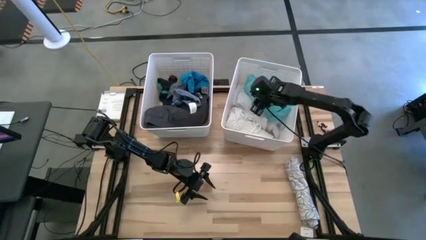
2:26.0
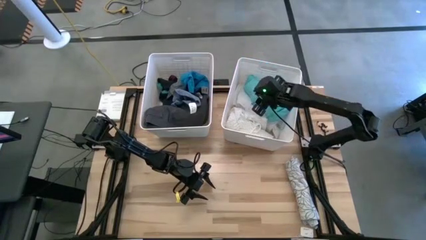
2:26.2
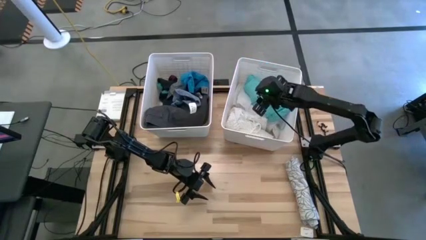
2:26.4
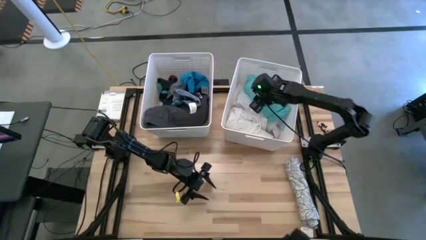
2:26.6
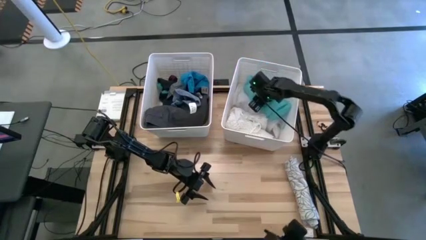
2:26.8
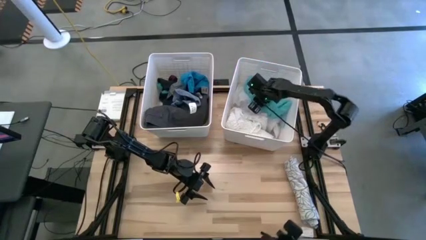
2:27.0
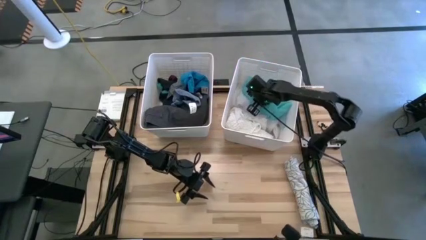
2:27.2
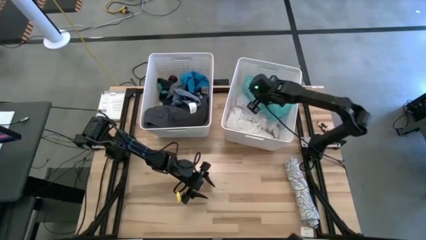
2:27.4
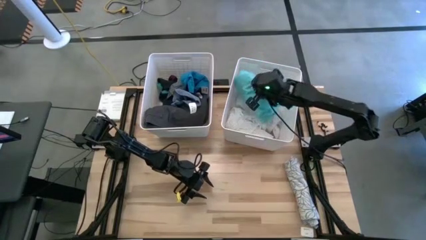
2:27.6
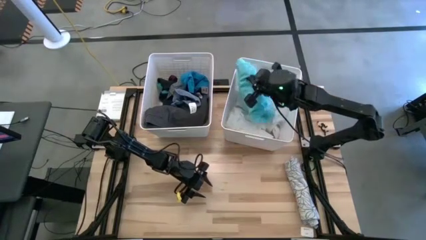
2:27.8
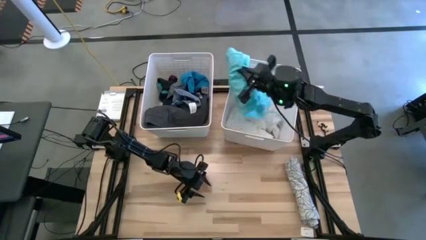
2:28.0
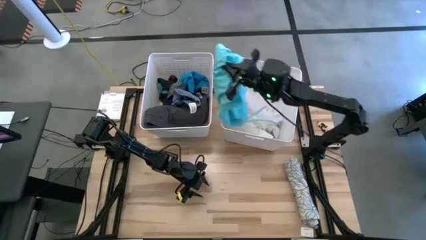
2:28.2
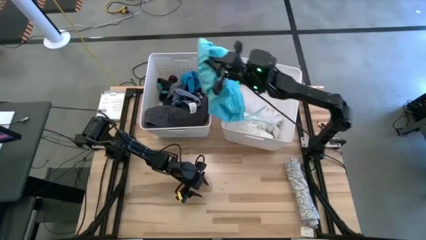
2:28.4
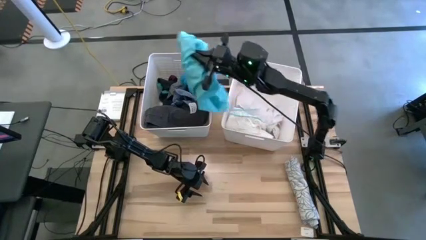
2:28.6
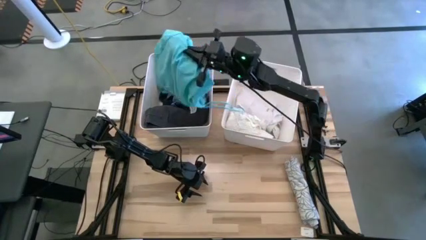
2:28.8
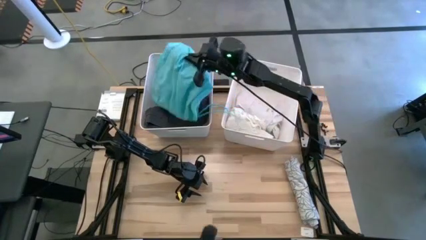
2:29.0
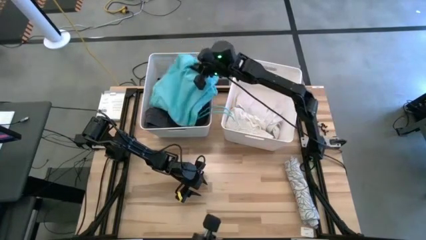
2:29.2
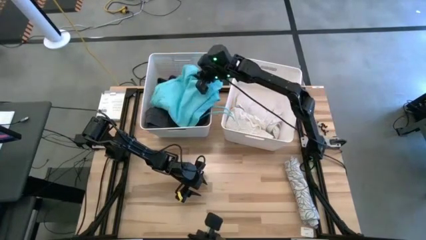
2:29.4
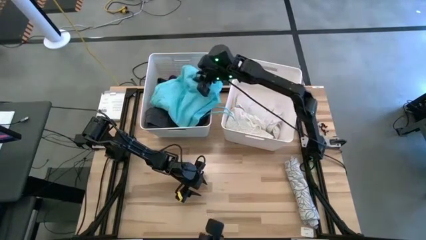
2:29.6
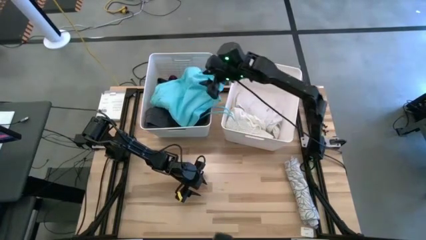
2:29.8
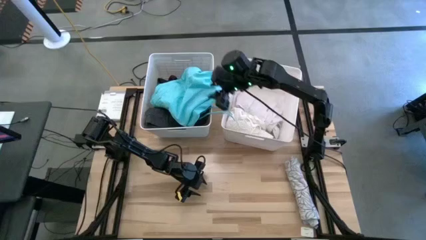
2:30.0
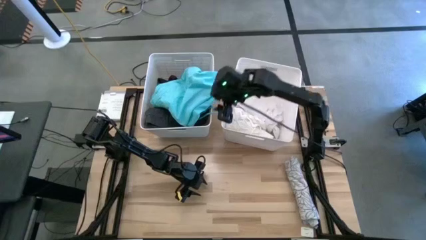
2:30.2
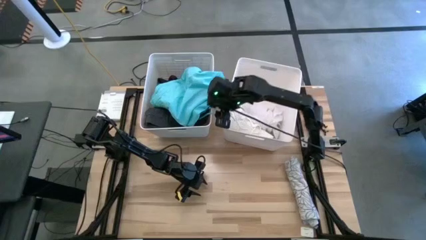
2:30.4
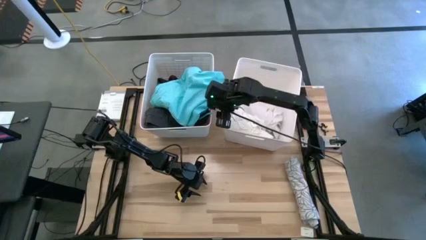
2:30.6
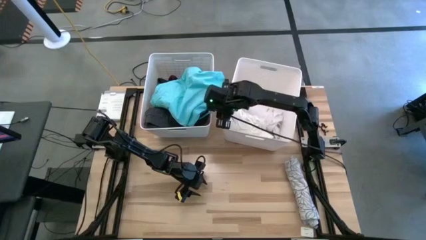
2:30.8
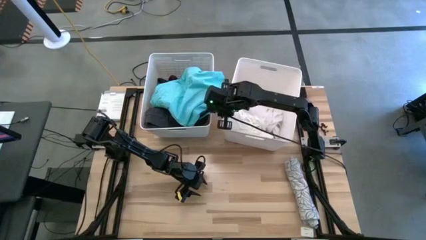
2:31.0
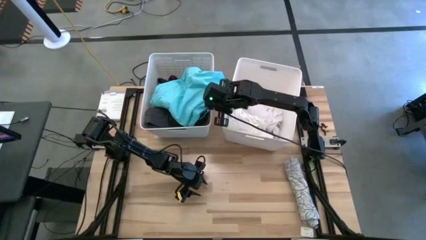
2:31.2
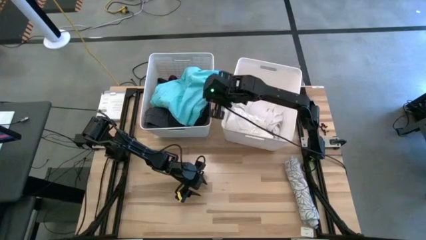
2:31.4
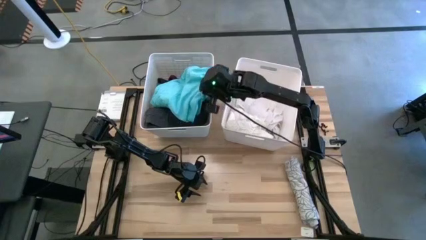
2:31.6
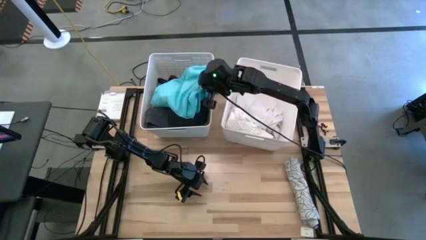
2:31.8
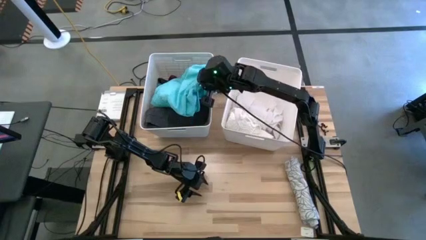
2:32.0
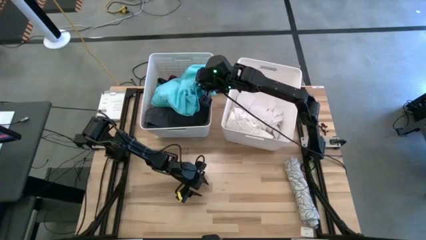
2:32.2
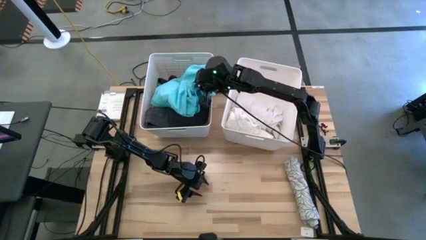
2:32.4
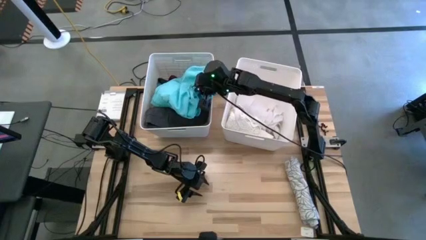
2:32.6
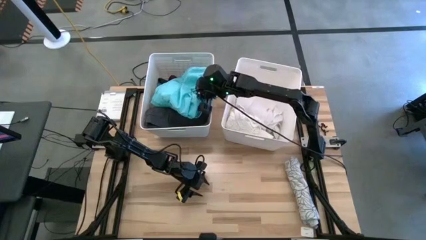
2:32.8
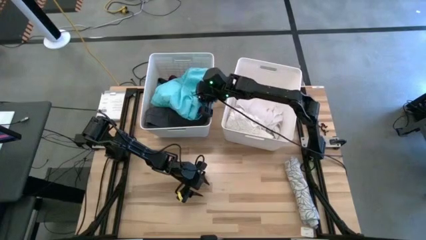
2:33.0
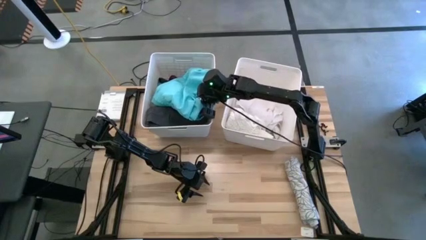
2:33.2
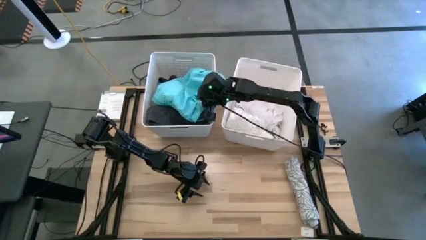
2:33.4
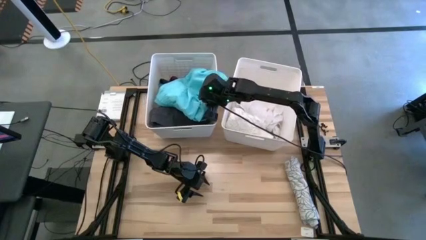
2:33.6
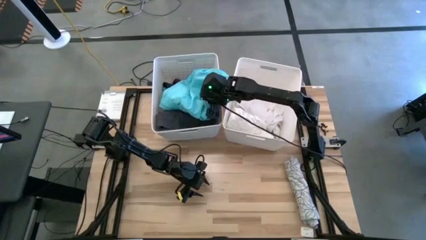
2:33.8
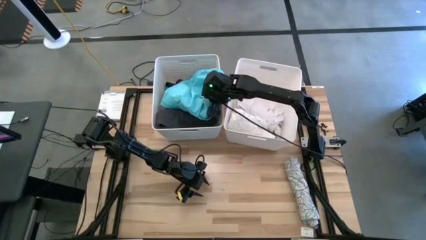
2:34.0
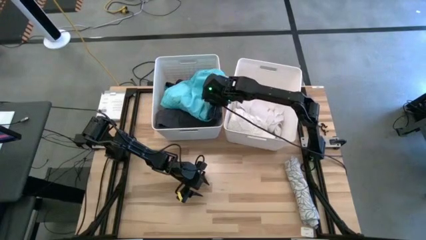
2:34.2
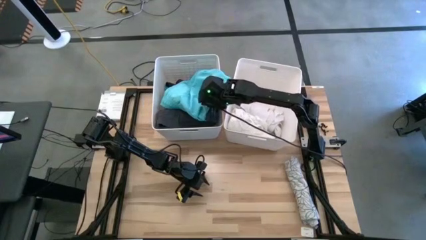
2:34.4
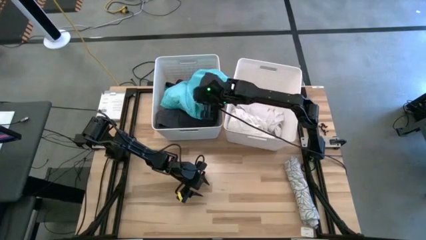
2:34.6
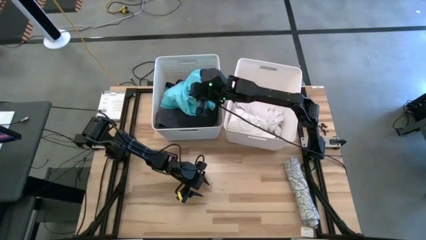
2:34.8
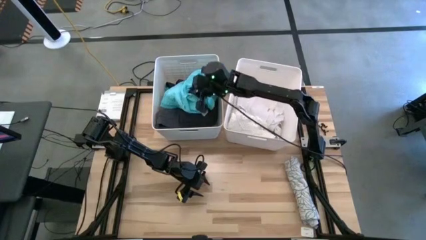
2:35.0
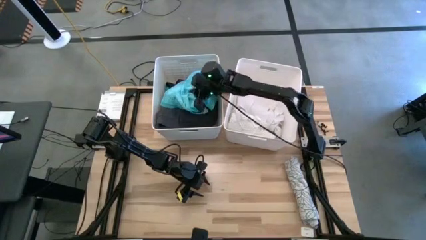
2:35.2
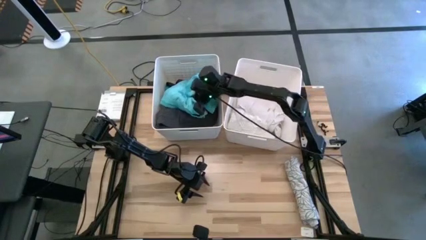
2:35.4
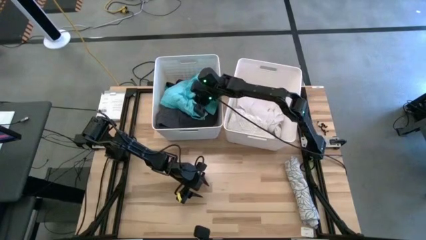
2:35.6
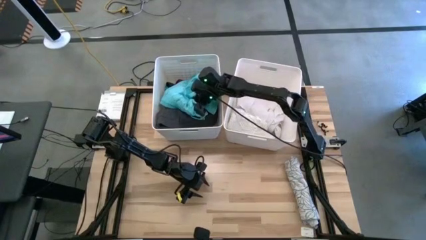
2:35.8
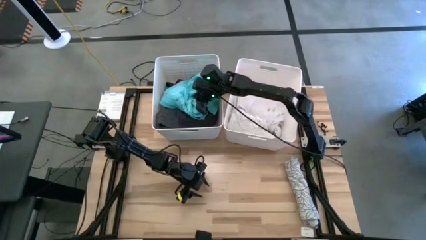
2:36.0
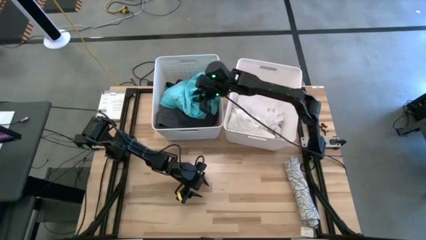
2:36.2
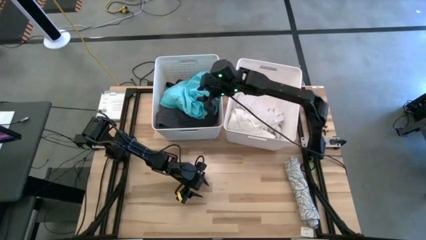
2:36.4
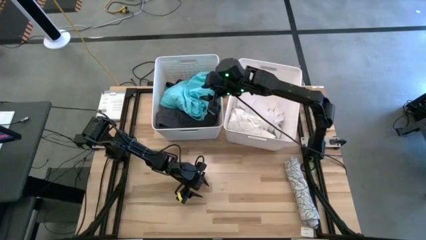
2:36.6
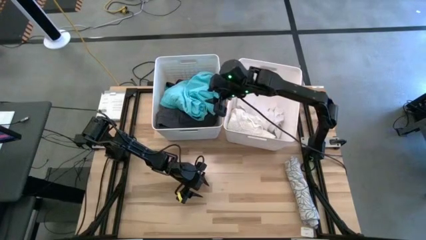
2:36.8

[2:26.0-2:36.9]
Task: Sort clothes
Put the rolled light blue shorts into the left white bin
